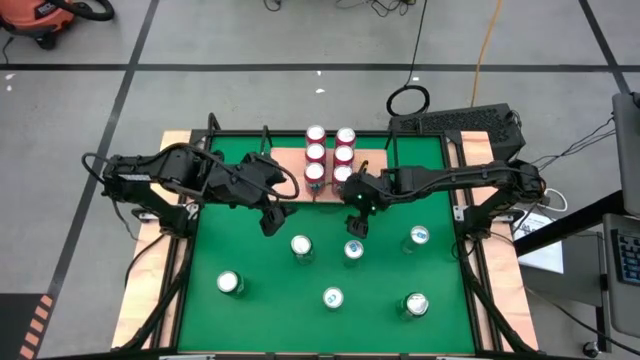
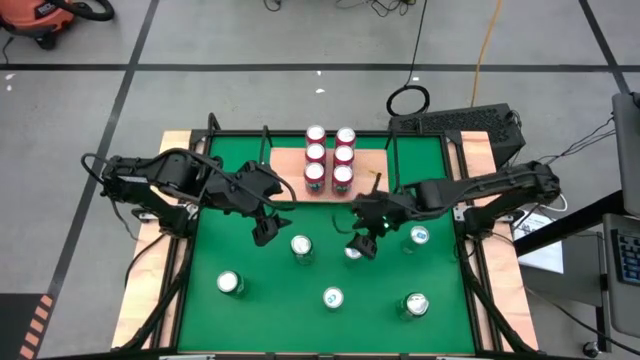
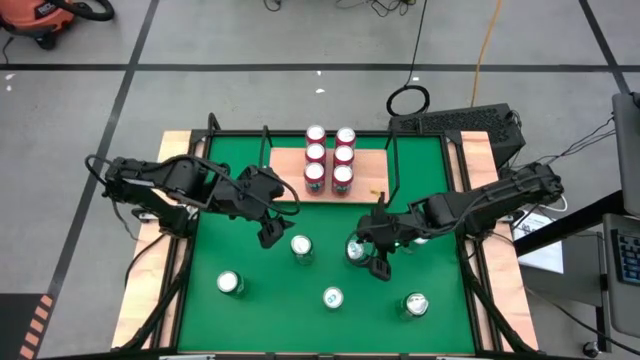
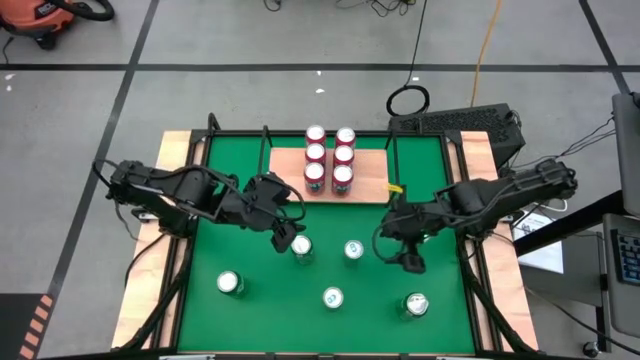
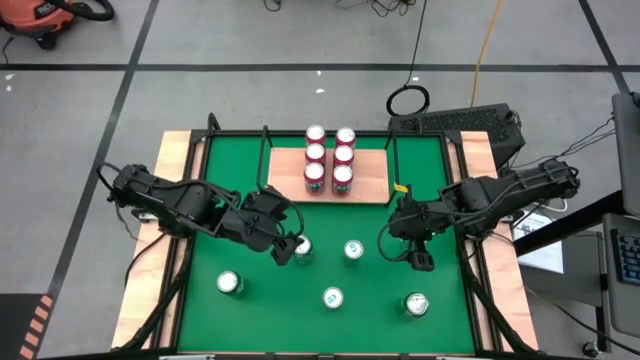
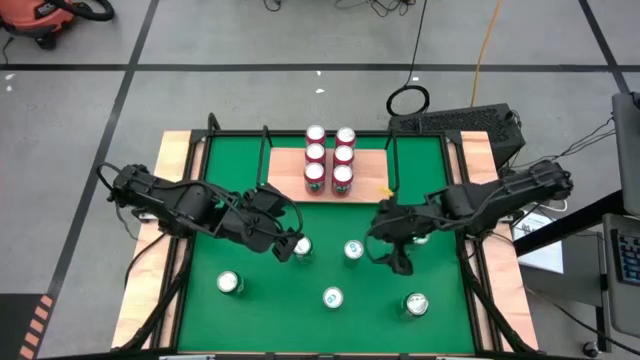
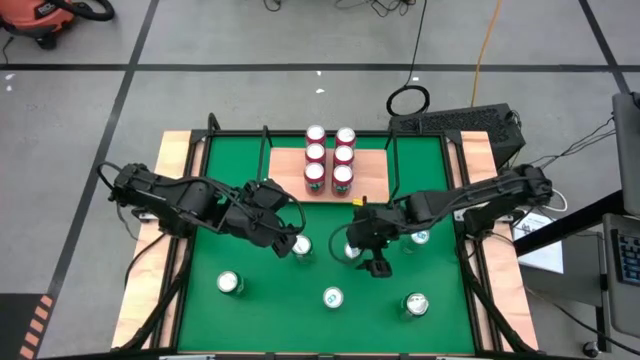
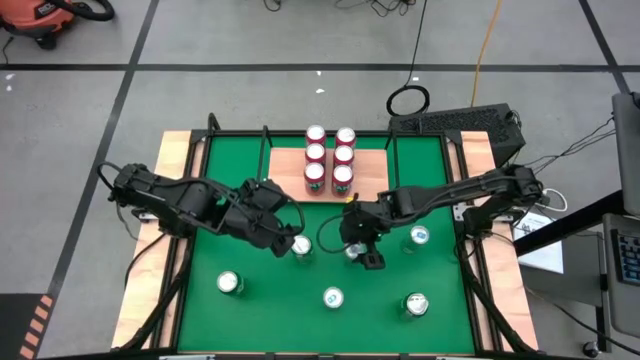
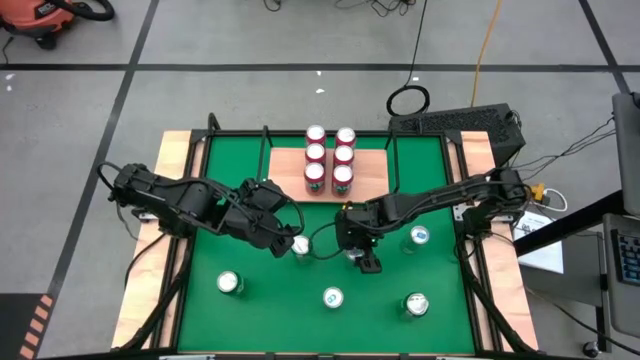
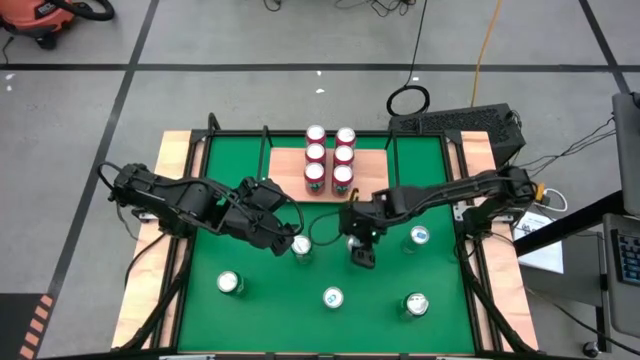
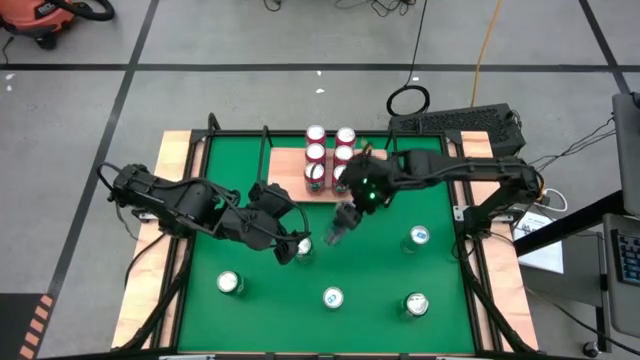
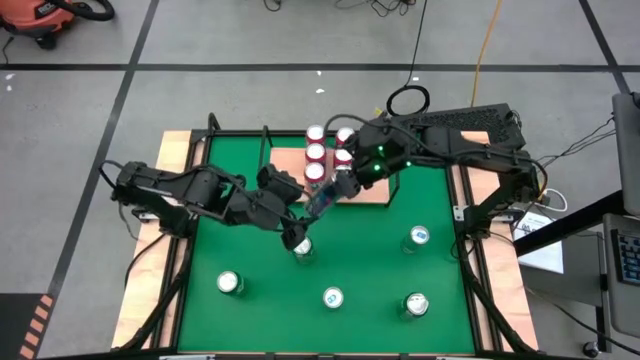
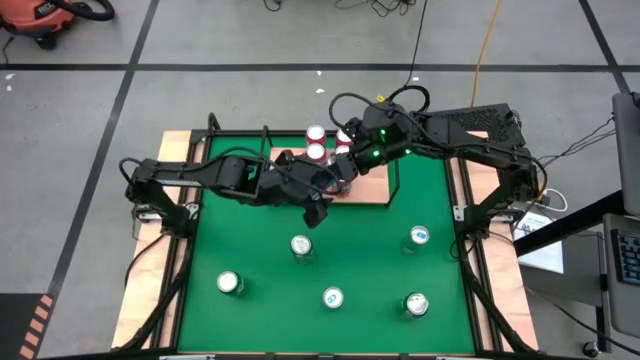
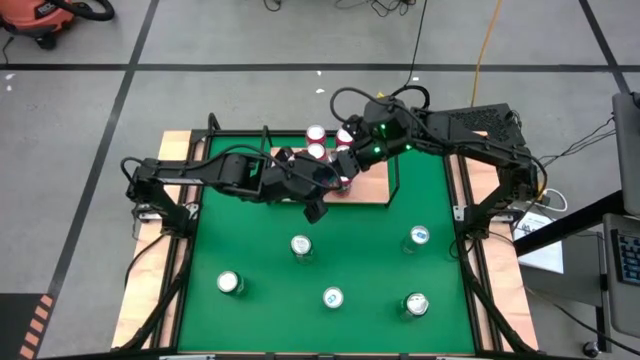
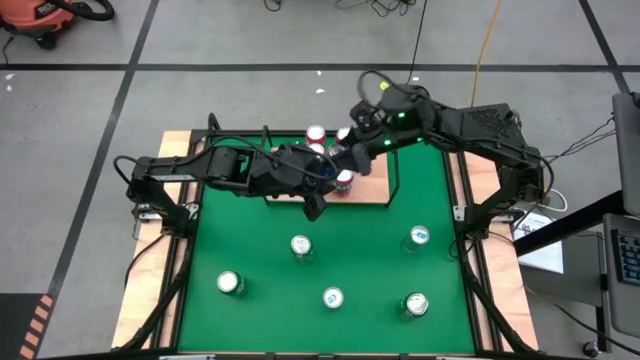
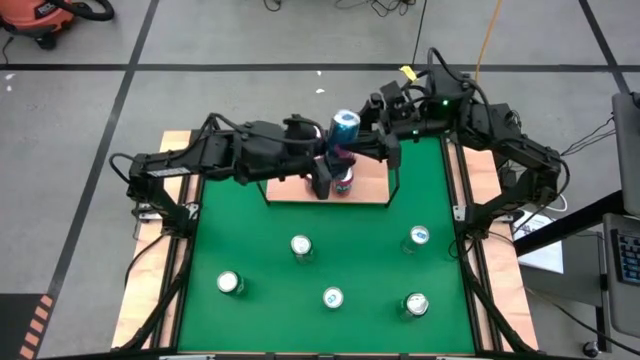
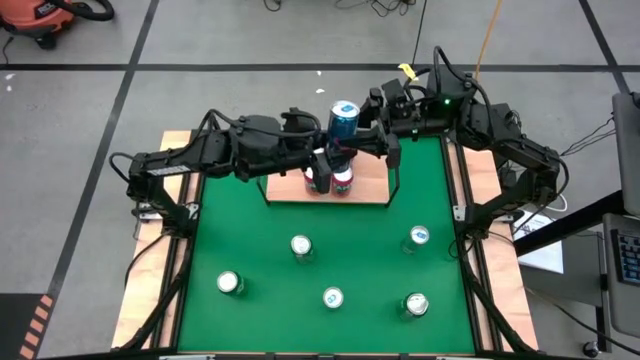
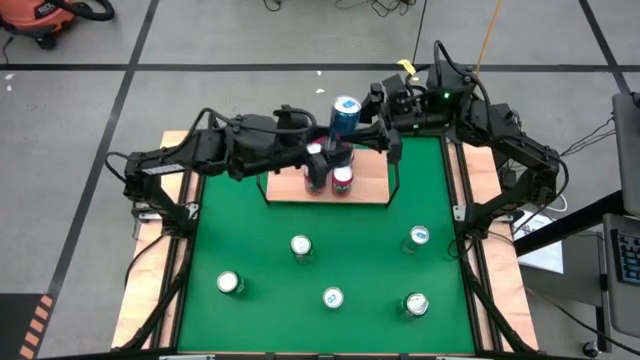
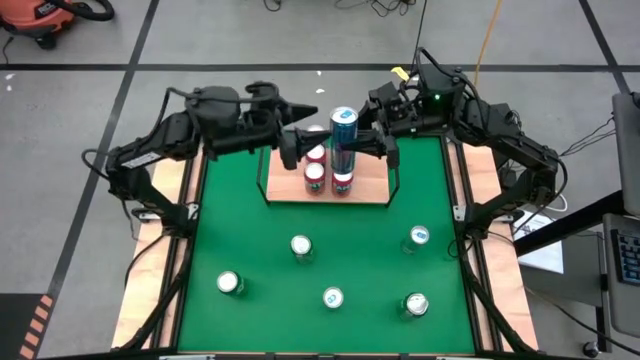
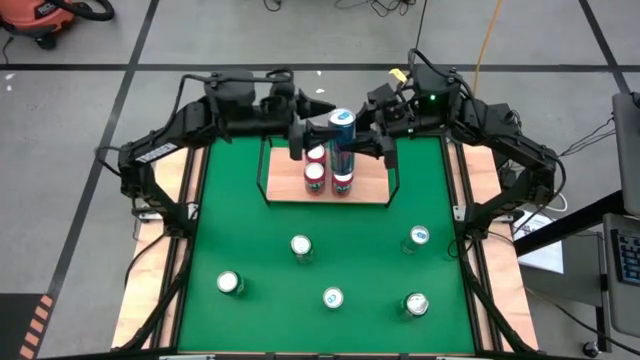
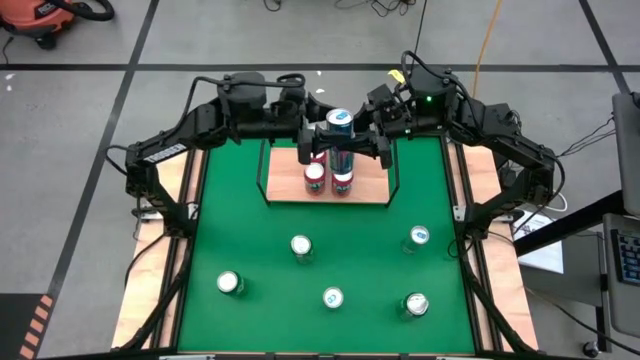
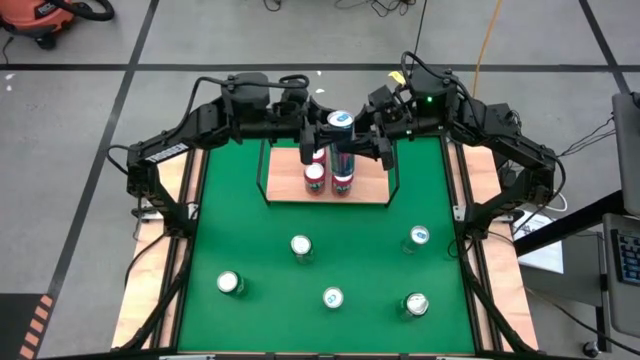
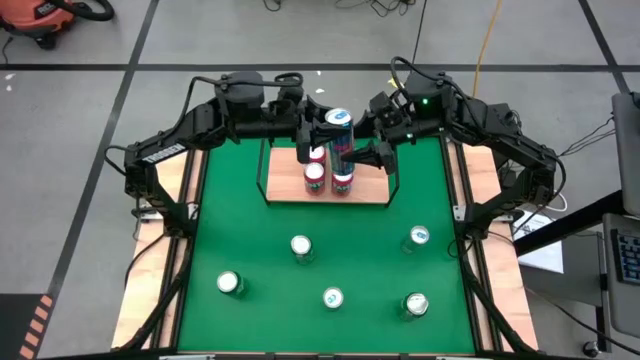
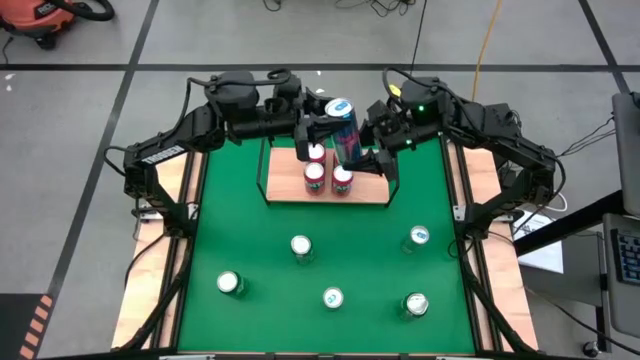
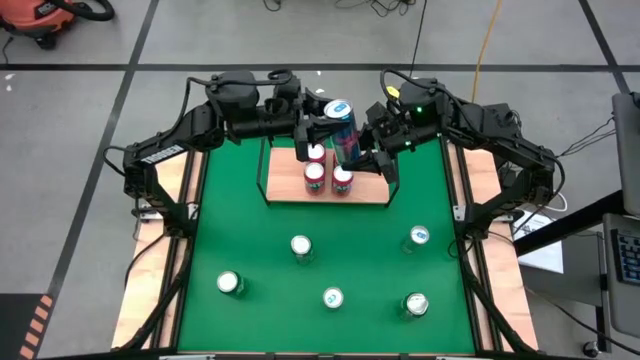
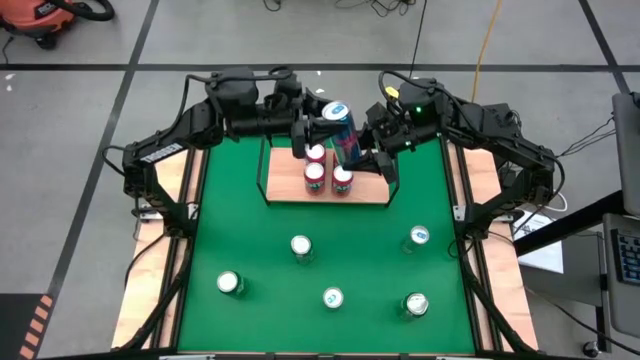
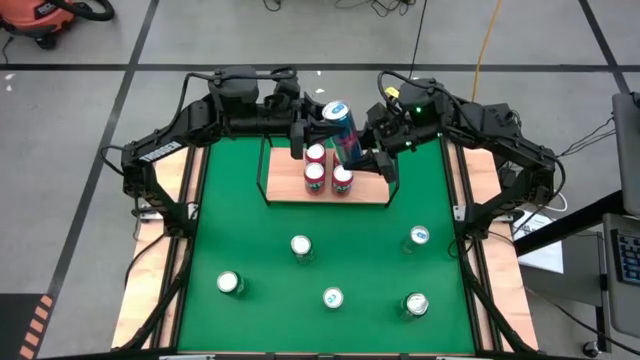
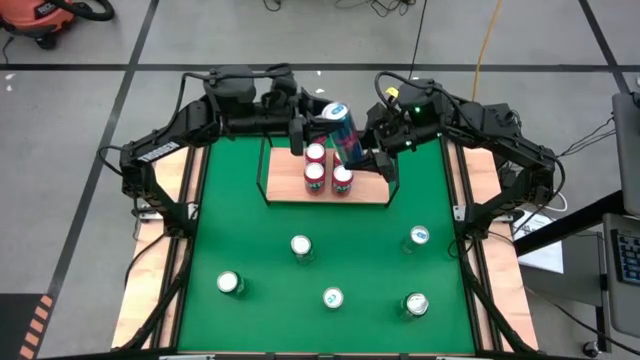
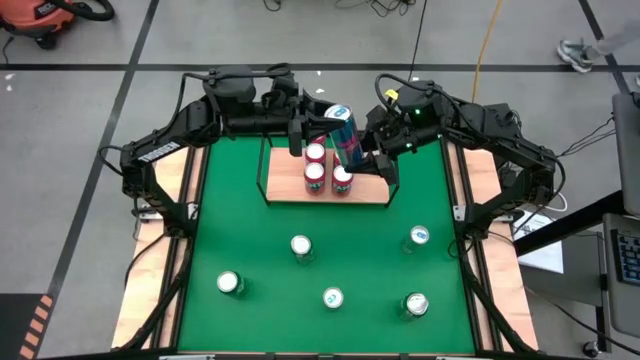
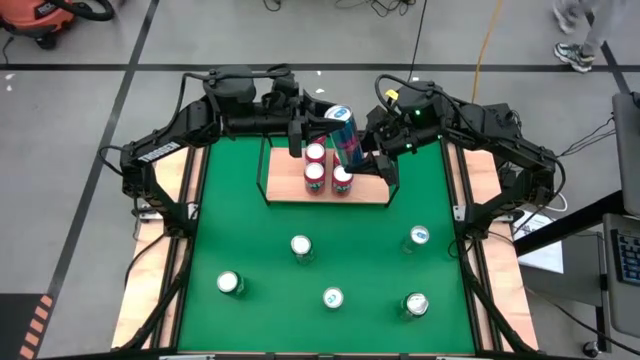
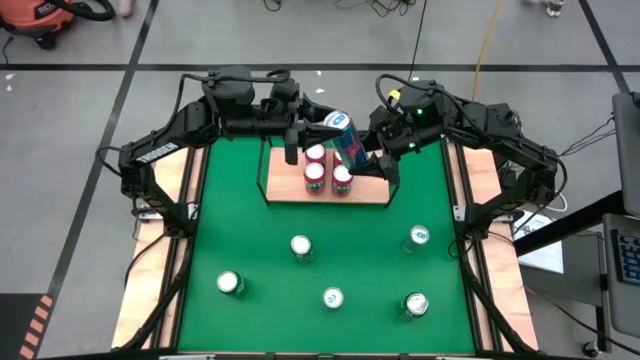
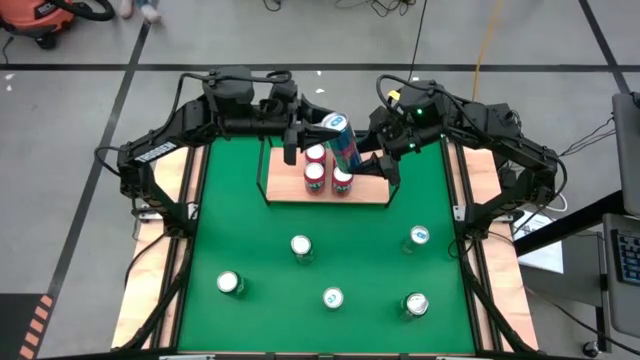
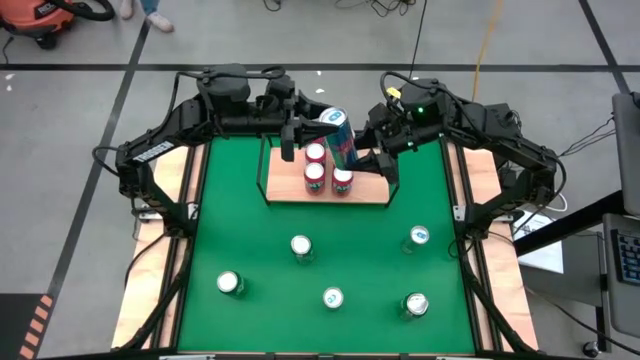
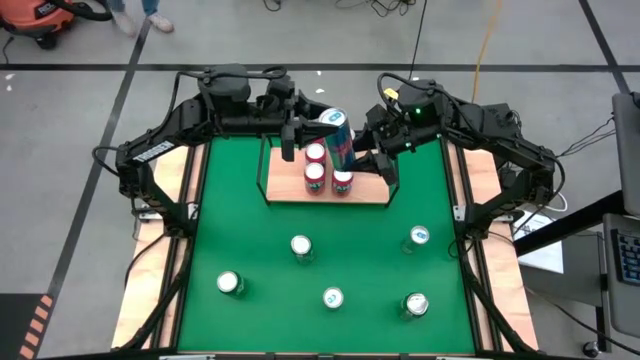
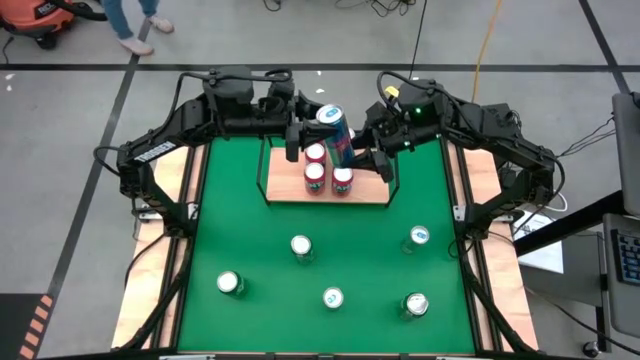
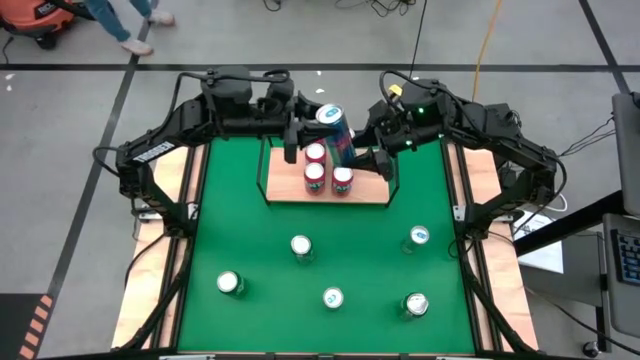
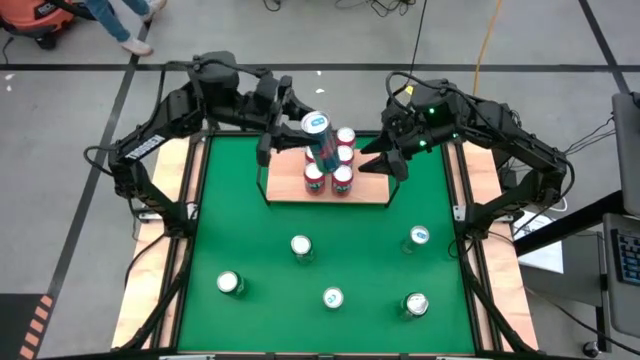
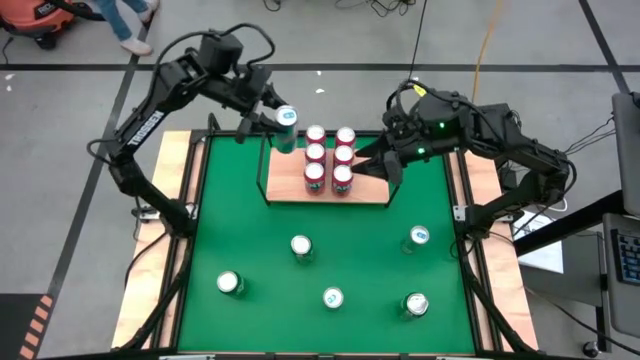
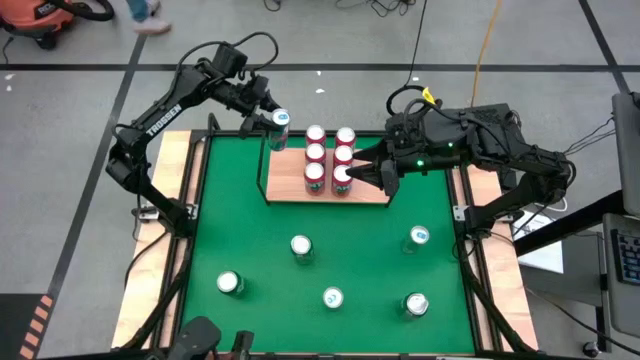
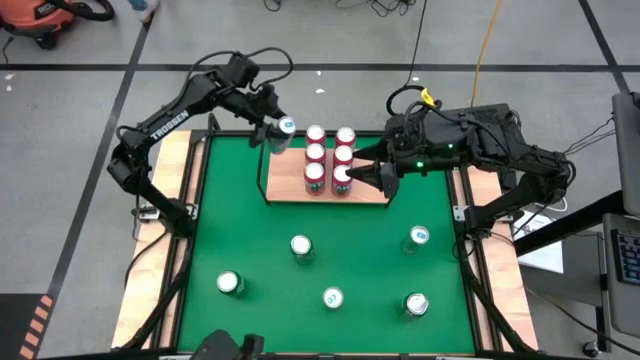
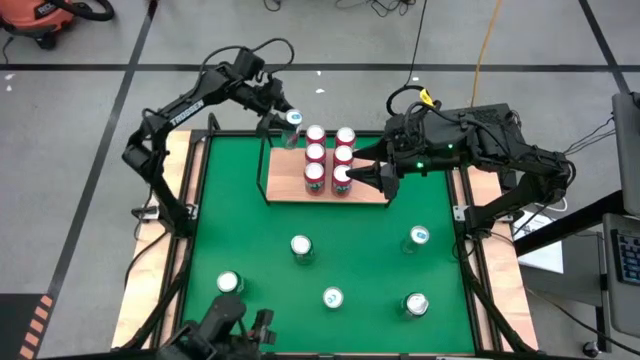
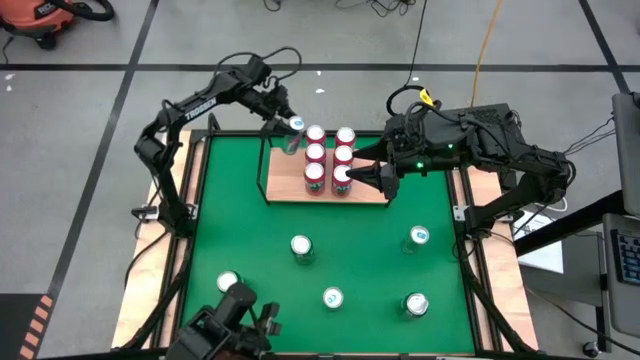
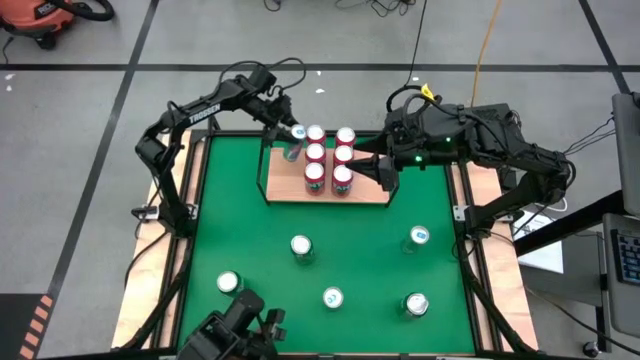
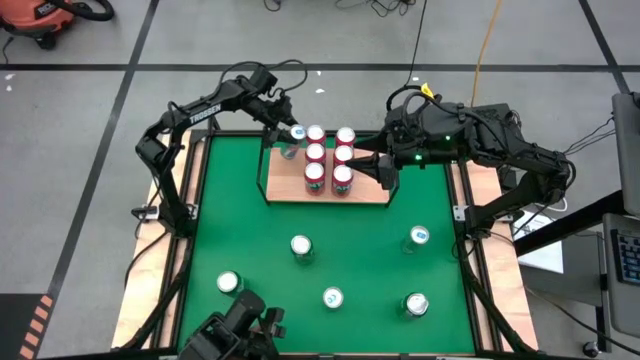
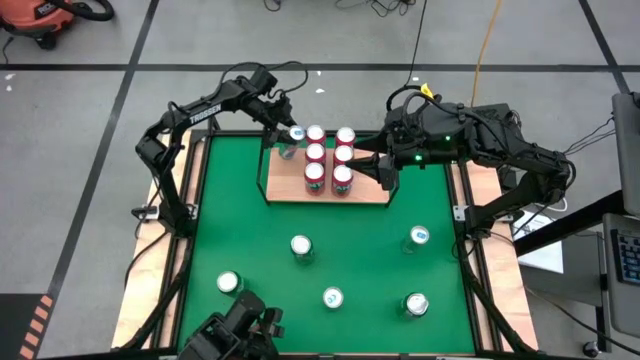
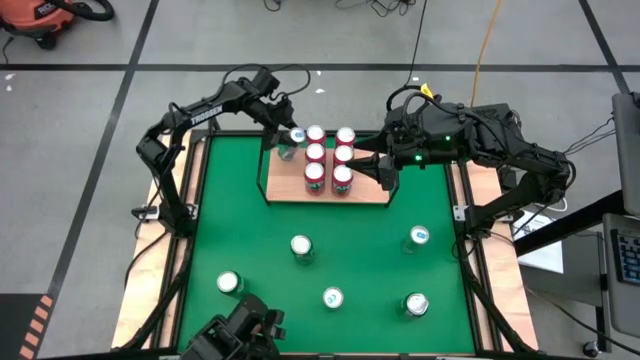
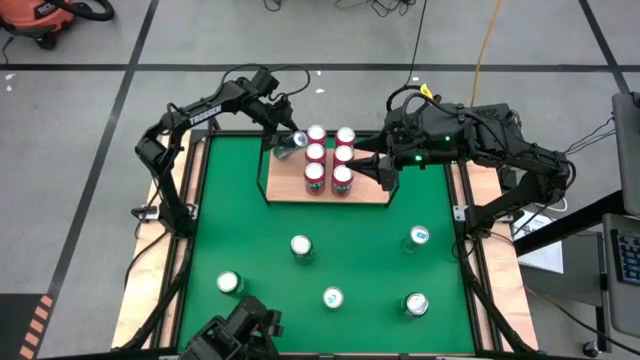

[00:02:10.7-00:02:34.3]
Task: Place canned beverage on shelf
Put the blue soda can on the shelf
